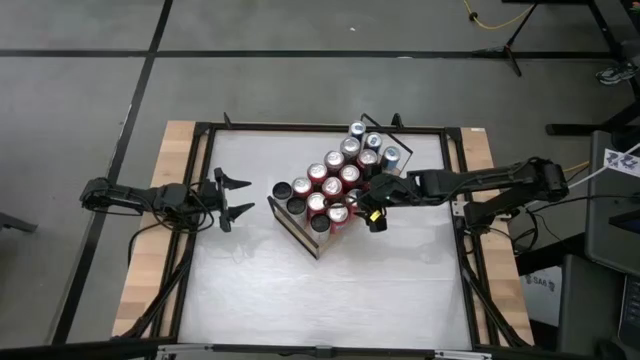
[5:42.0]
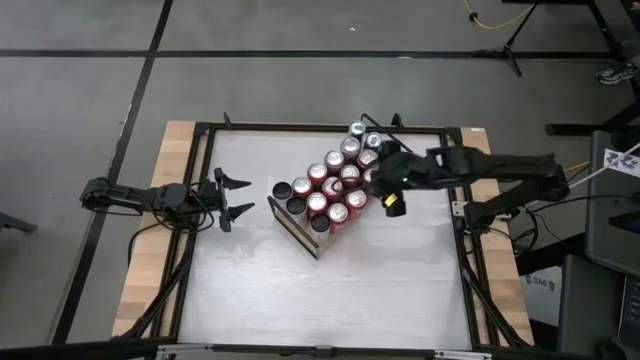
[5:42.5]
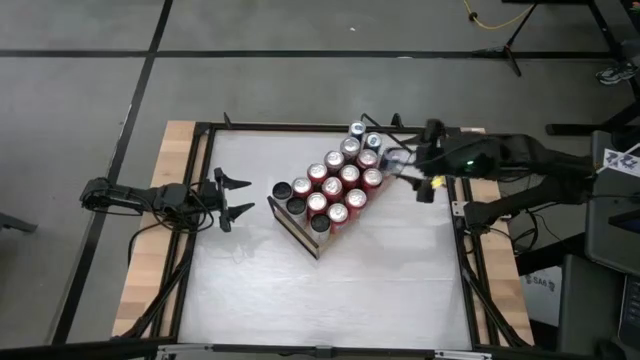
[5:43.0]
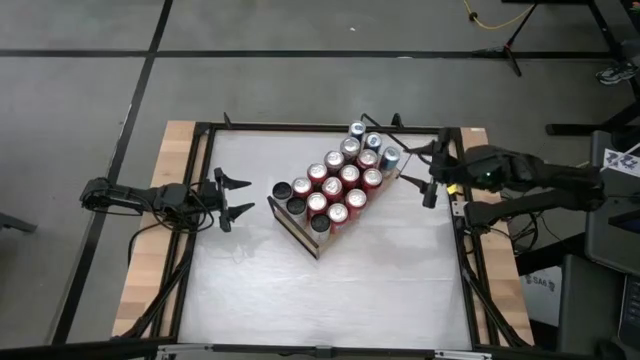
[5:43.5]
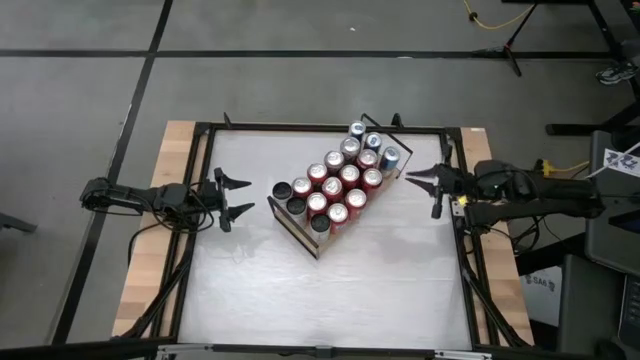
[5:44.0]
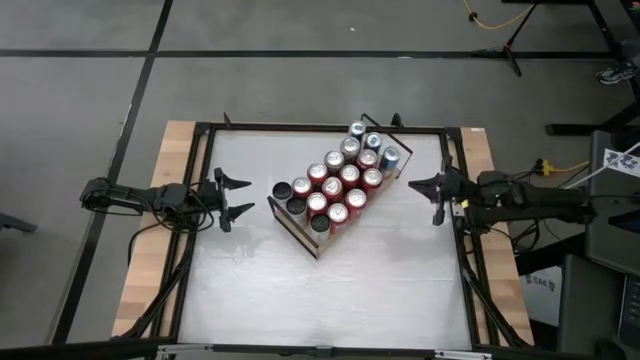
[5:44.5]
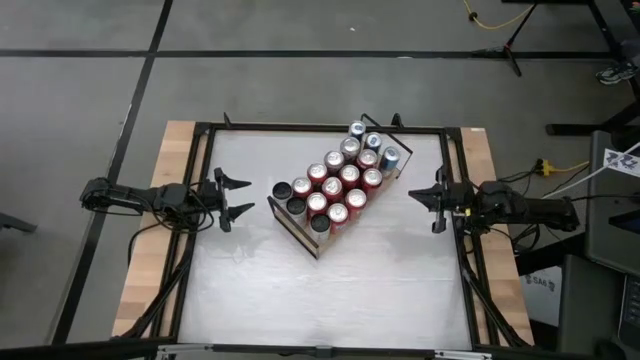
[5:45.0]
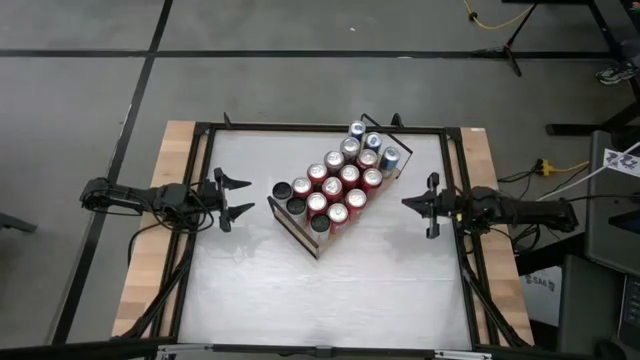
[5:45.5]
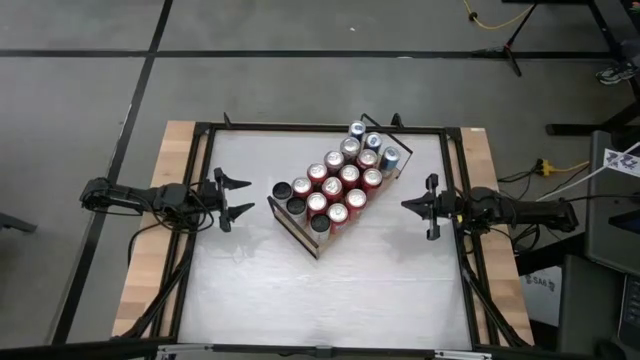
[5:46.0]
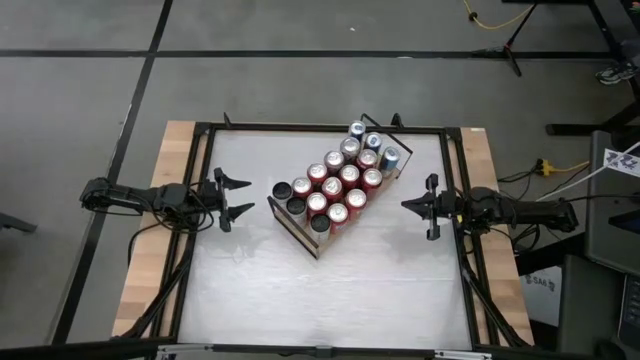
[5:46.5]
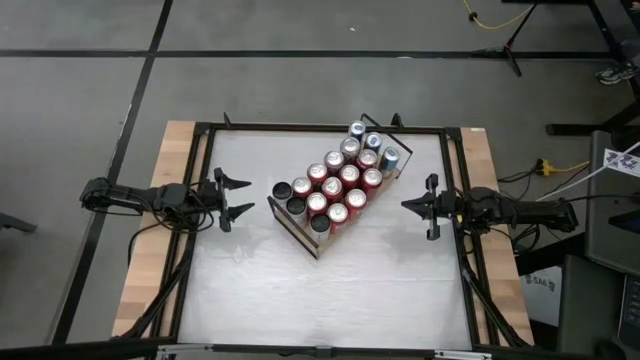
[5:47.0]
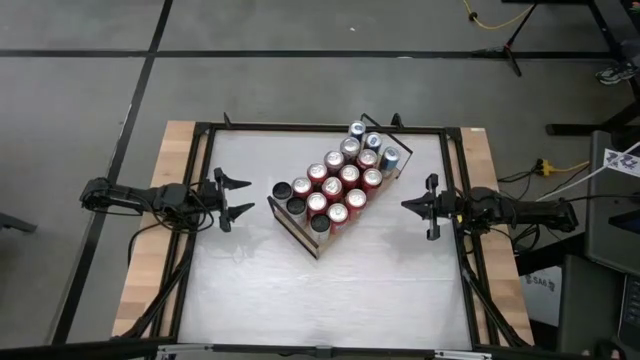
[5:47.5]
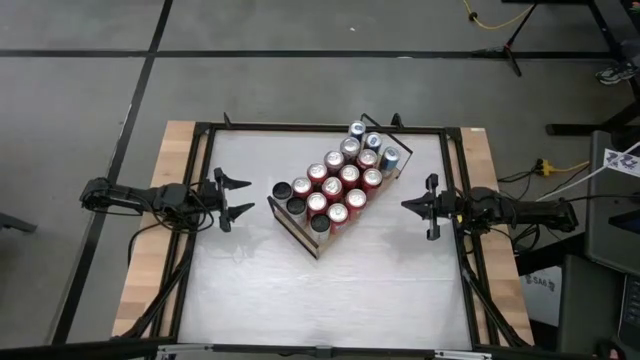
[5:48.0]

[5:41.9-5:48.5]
Task: Place canned beverage on shelf
Return to Home Position

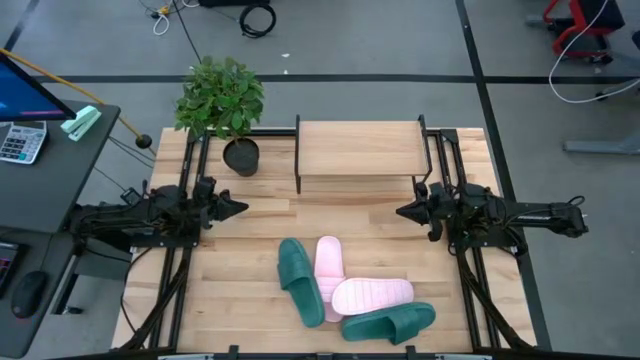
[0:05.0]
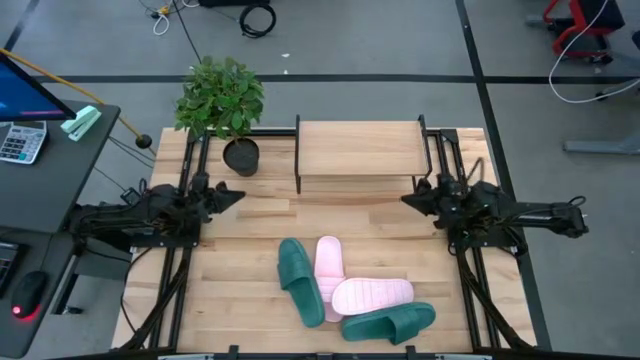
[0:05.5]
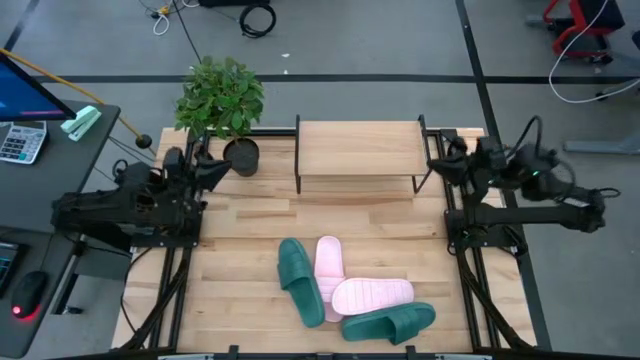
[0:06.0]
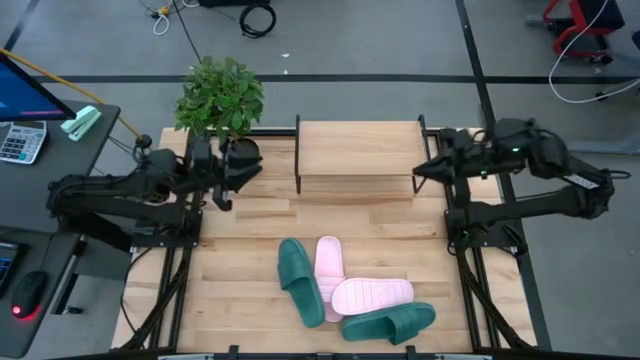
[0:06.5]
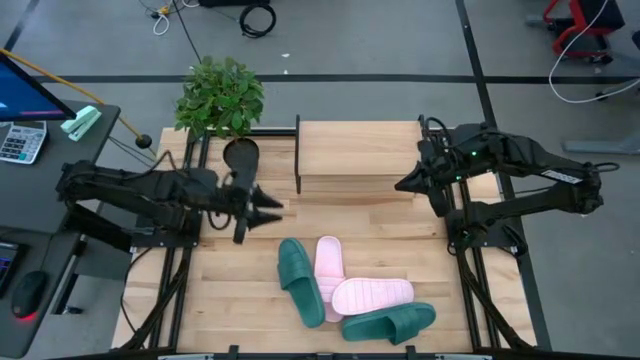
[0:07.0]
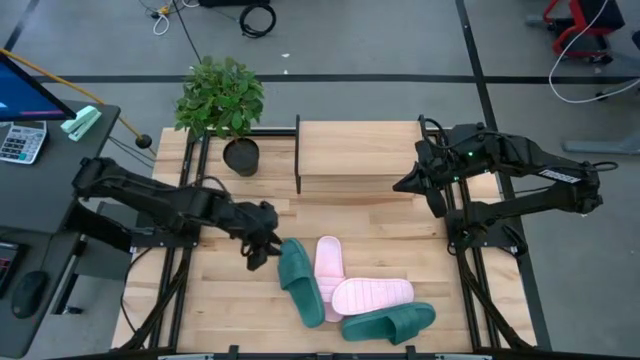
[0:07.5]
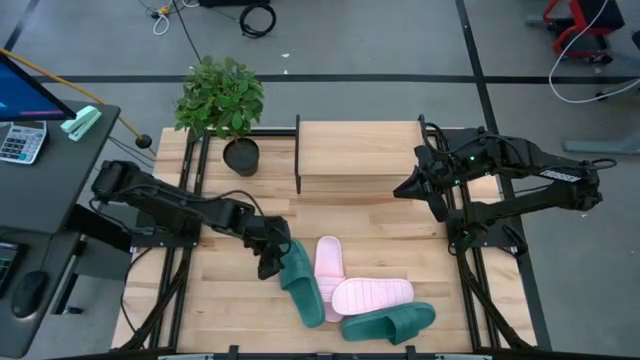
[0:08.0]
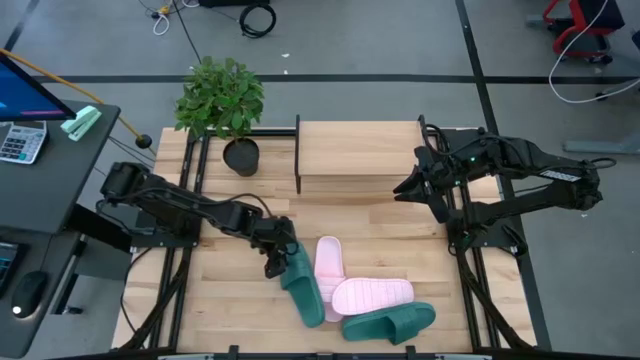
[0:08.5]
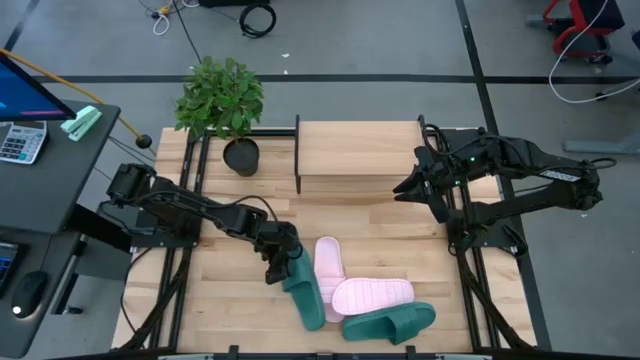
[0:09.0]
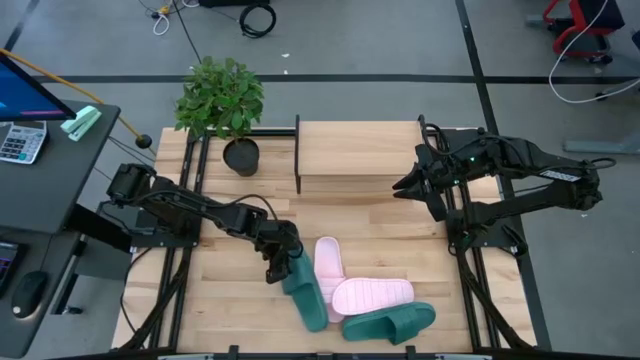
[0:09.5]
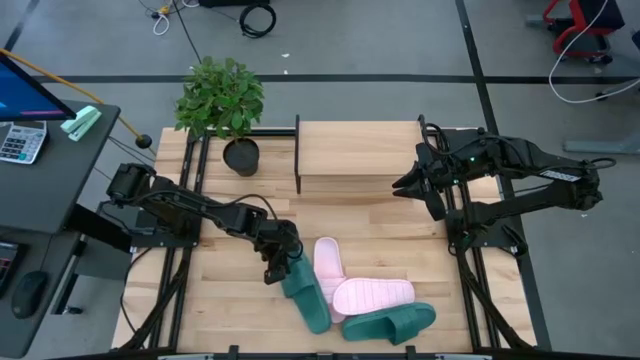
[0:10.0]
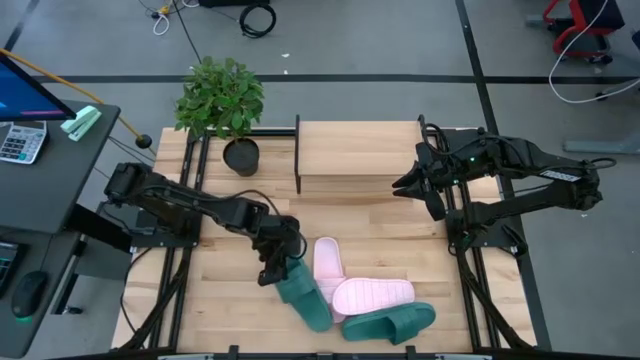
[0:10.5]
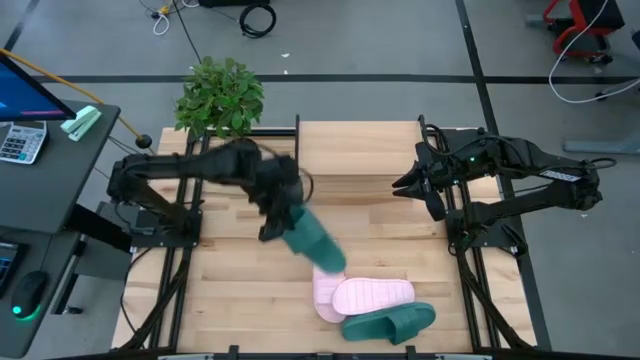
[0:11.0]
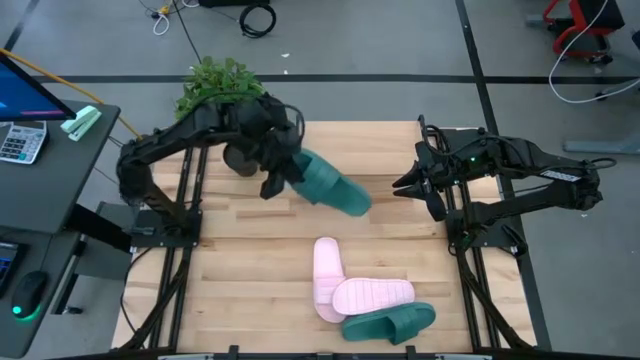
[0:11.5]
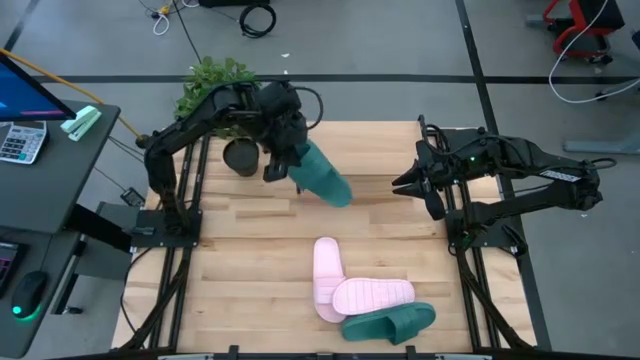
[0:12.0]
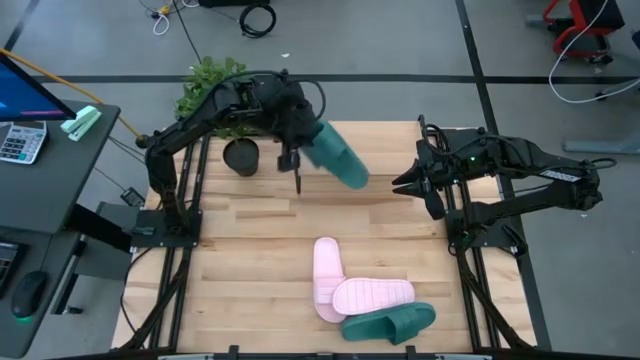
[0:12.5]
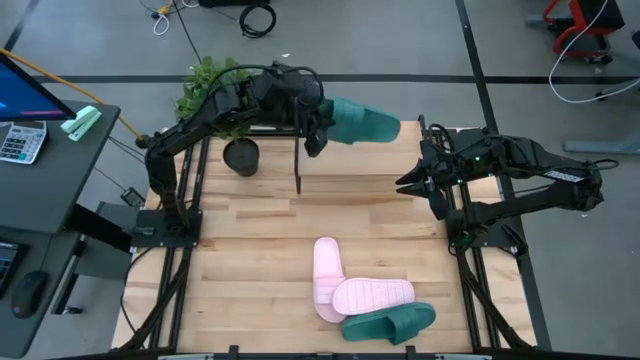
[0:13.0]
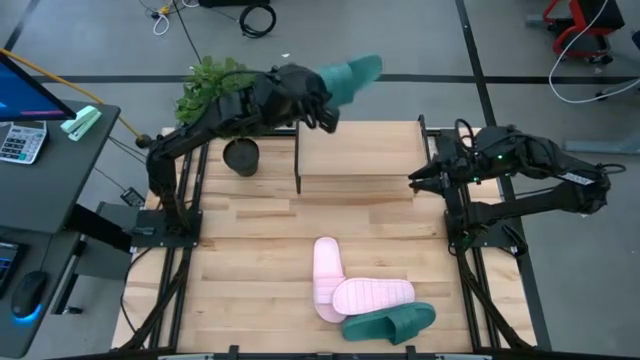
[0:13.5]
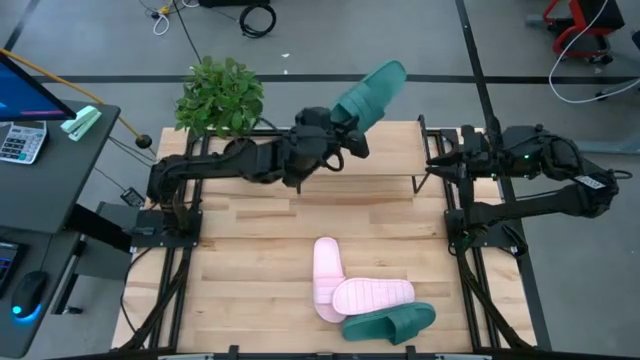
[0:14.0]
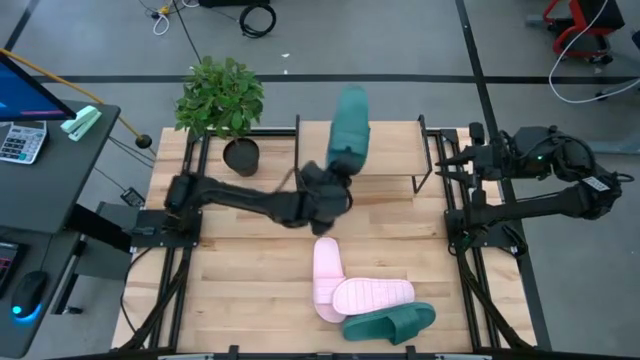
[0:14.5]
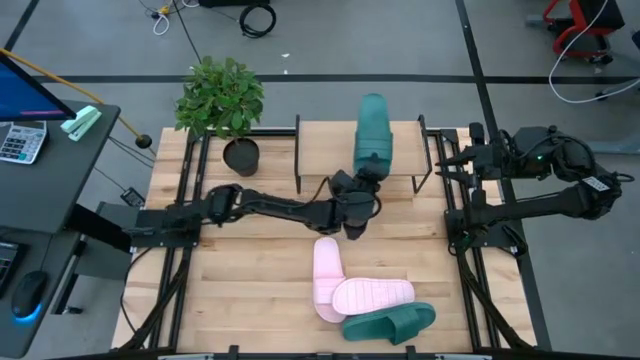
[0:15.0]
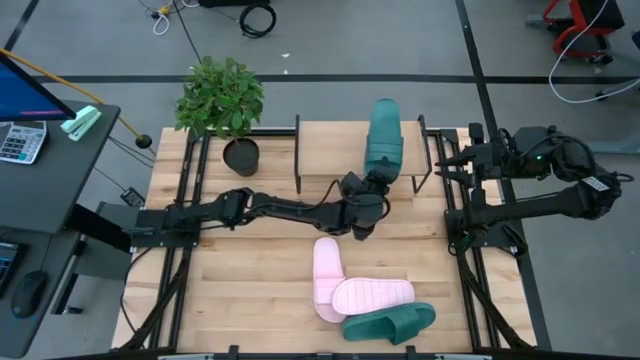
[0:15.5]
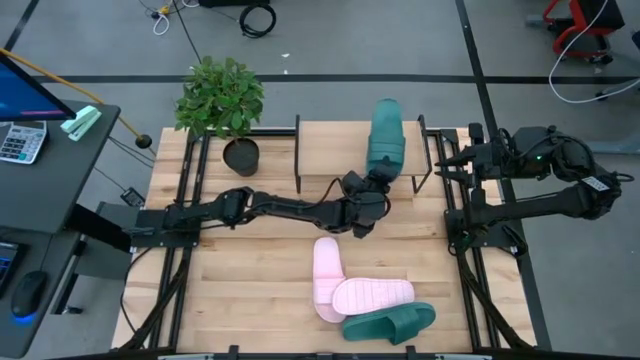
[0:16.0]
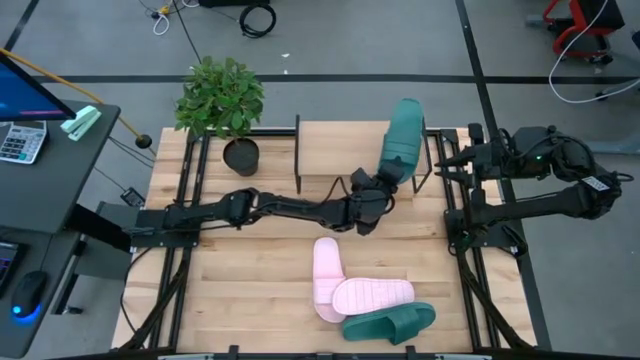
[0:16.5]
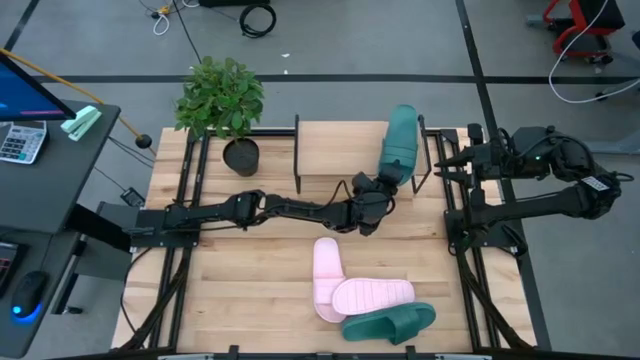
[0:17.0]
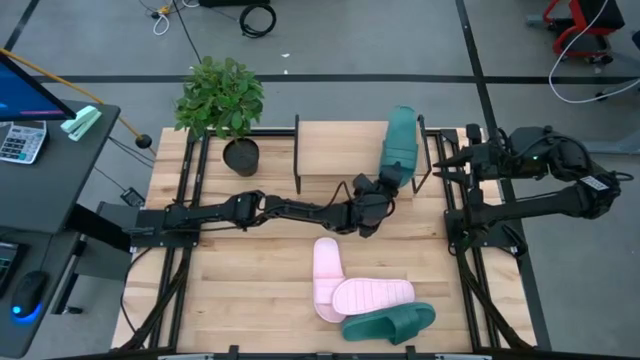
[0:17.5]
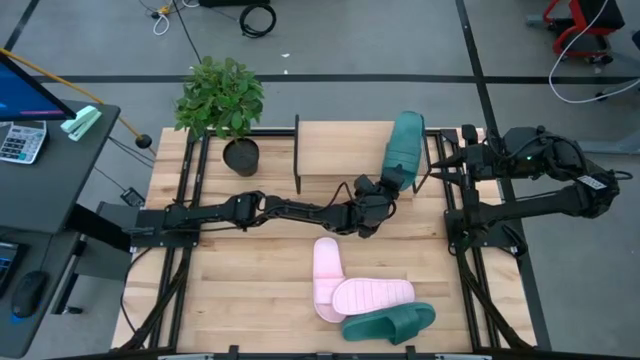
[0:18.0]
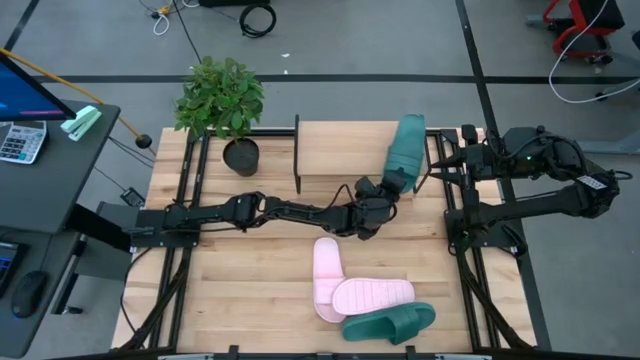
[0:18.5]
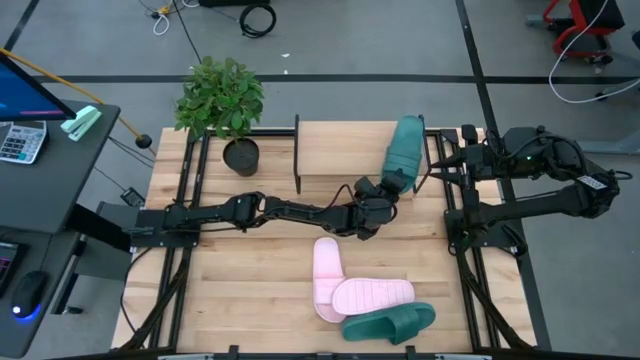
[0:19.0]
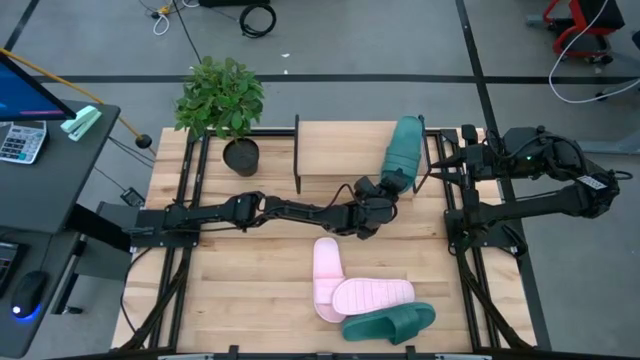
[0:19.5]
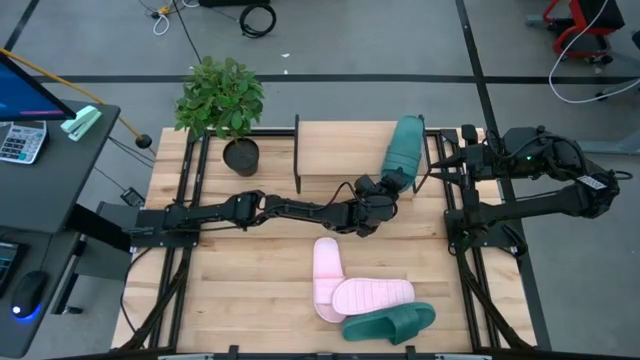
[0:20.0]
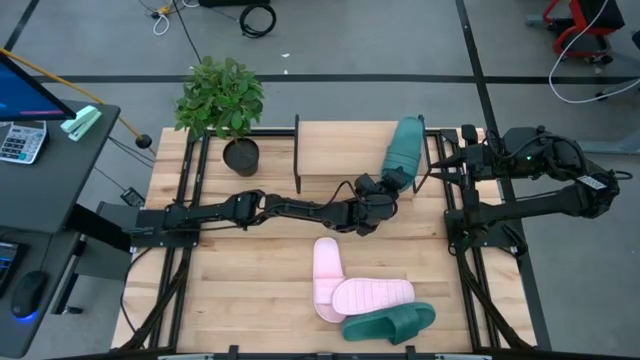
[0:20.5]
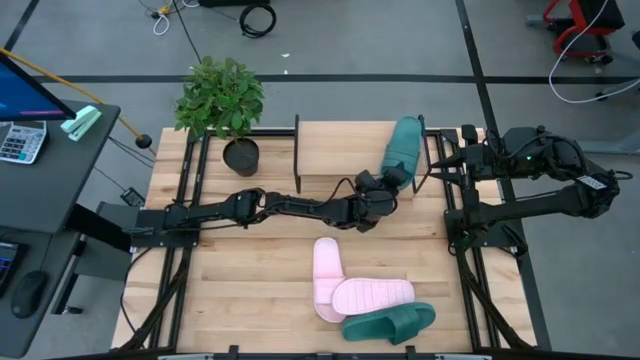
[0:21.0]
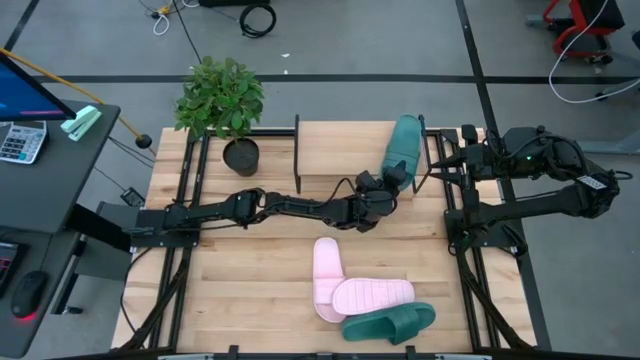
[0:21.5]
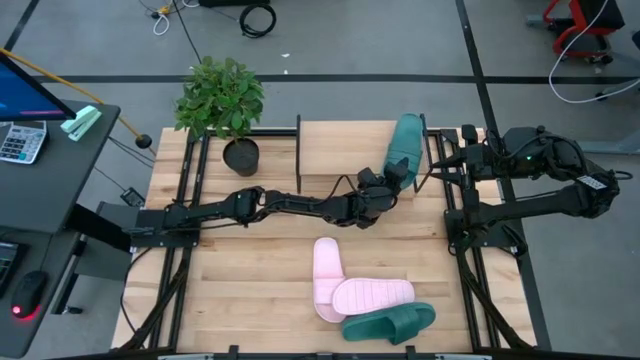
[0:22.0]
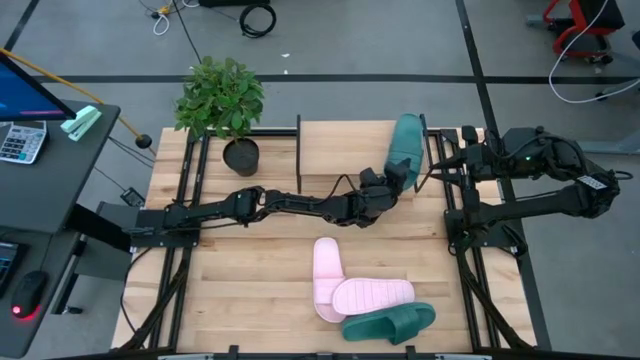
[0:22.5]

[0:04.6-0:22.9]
Task: Pick and place slides into the shelf
Put the right dark green slipper on the shelf
